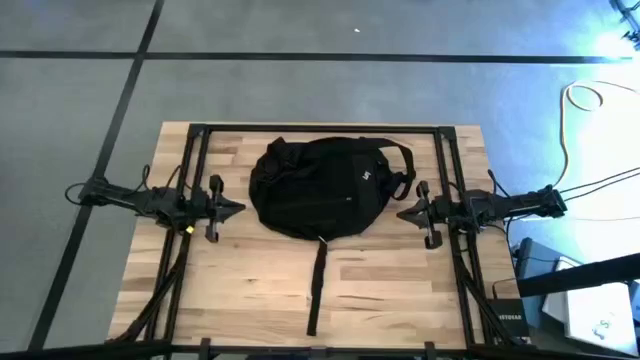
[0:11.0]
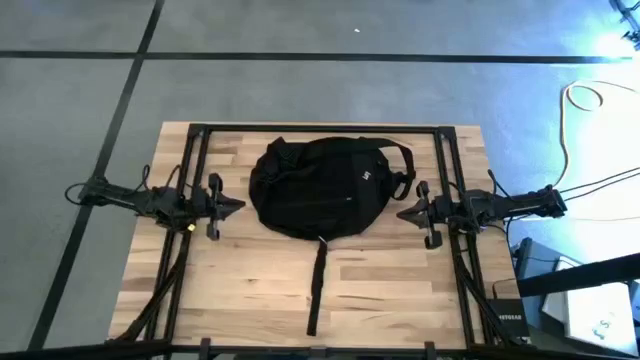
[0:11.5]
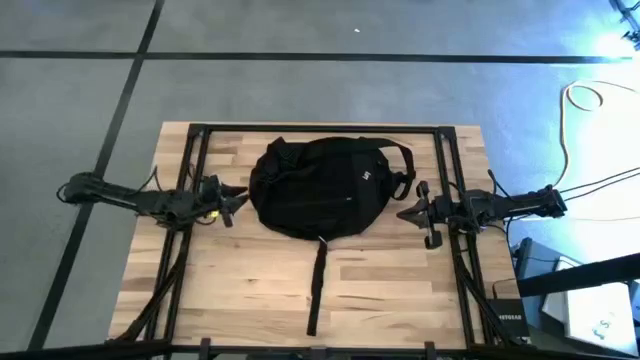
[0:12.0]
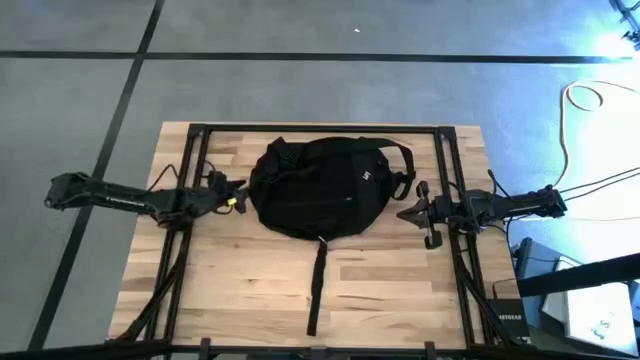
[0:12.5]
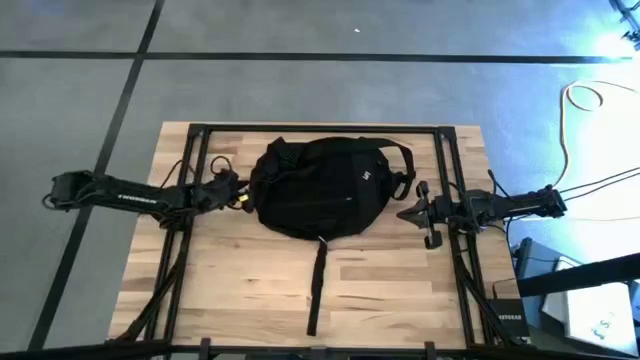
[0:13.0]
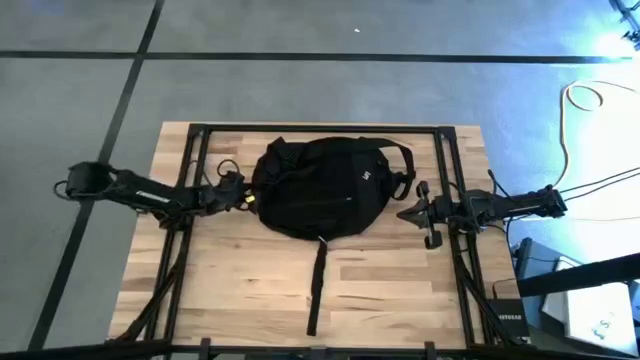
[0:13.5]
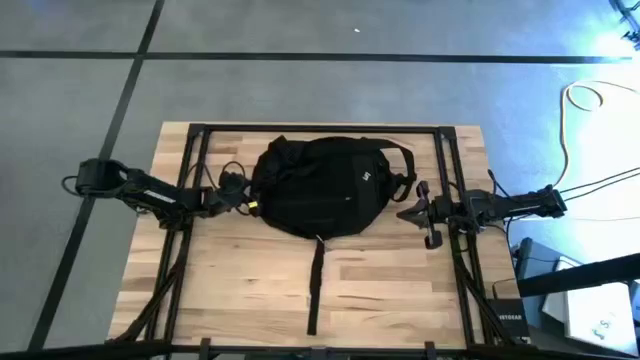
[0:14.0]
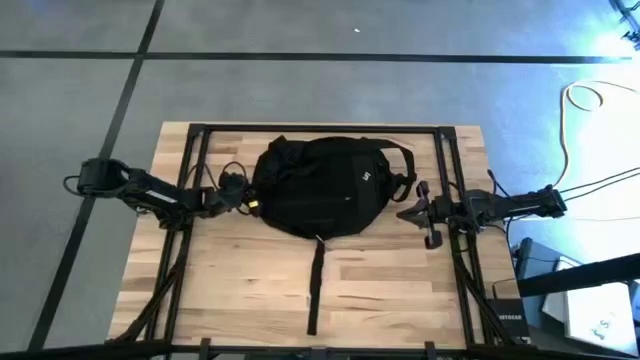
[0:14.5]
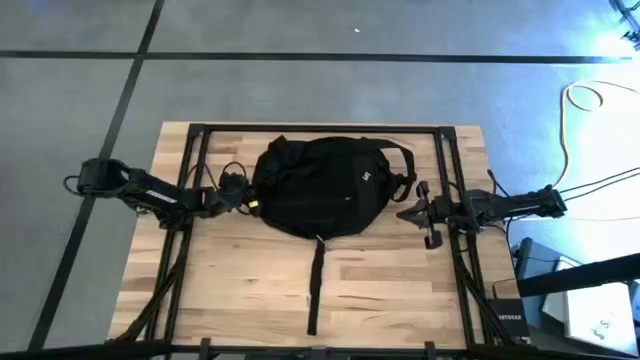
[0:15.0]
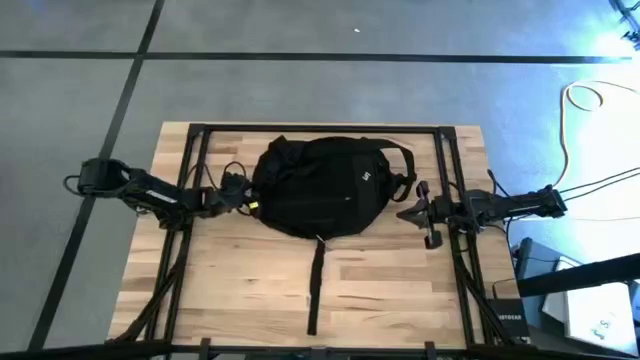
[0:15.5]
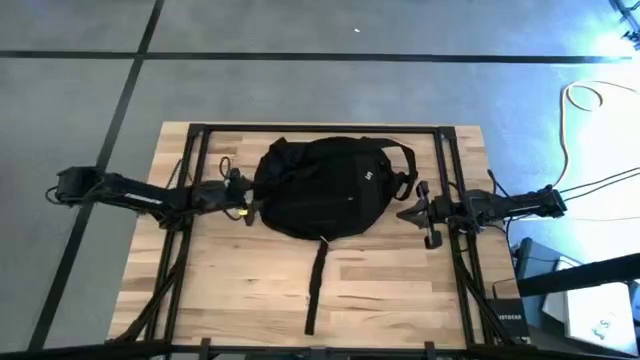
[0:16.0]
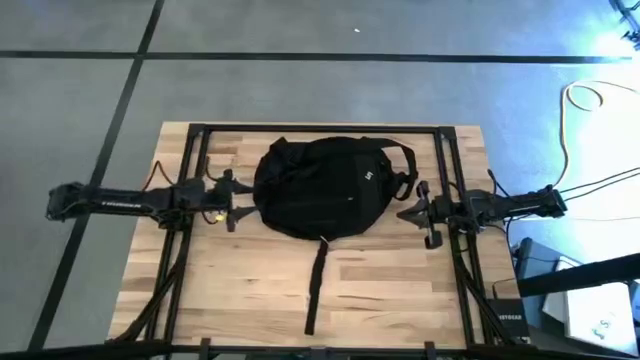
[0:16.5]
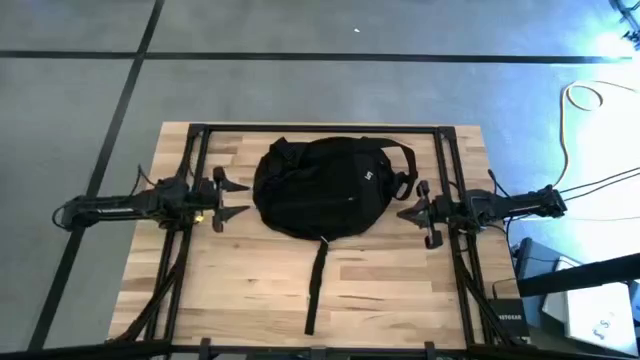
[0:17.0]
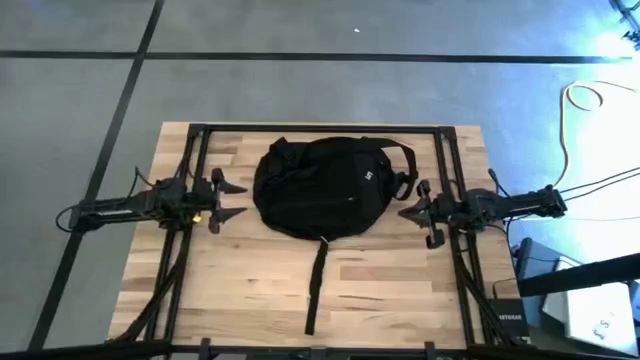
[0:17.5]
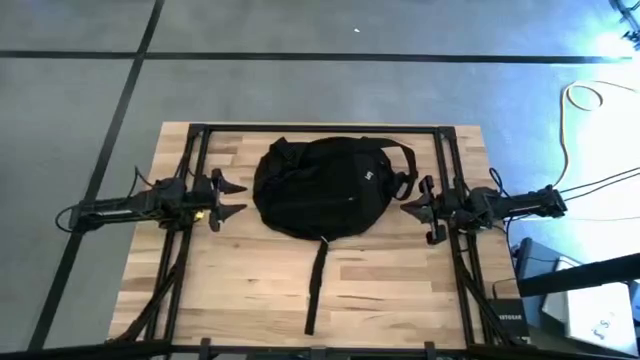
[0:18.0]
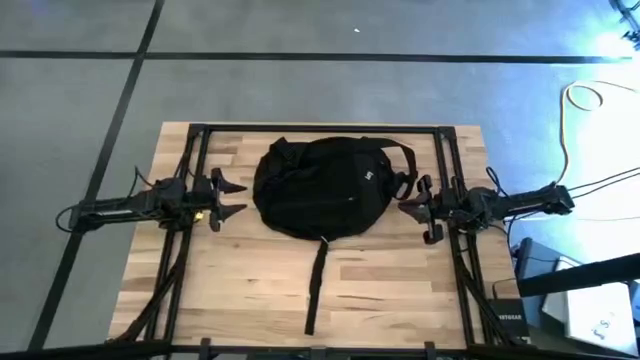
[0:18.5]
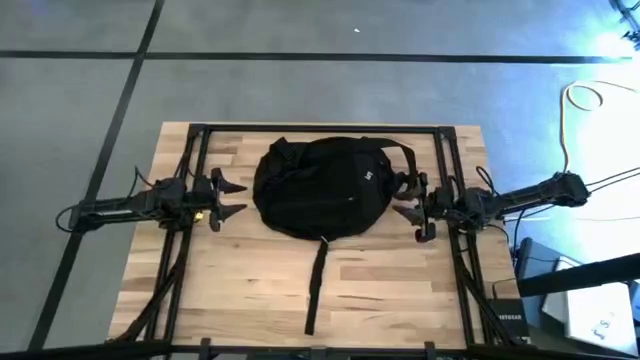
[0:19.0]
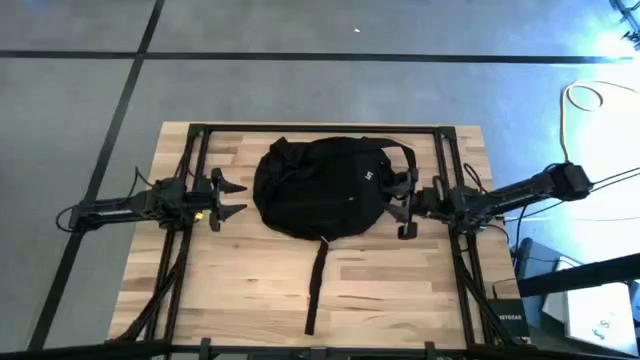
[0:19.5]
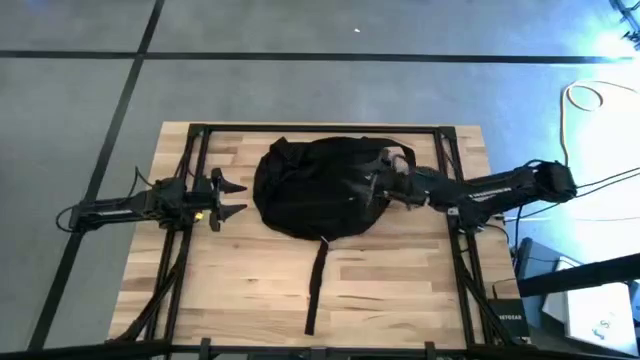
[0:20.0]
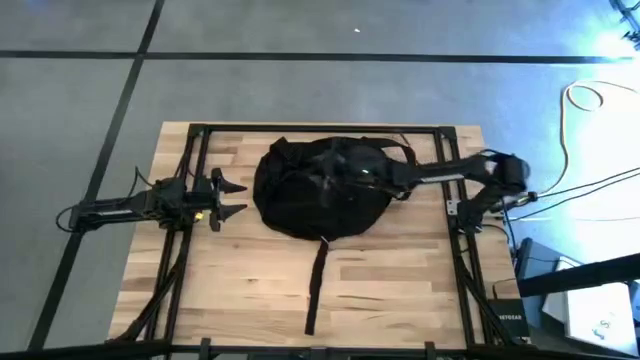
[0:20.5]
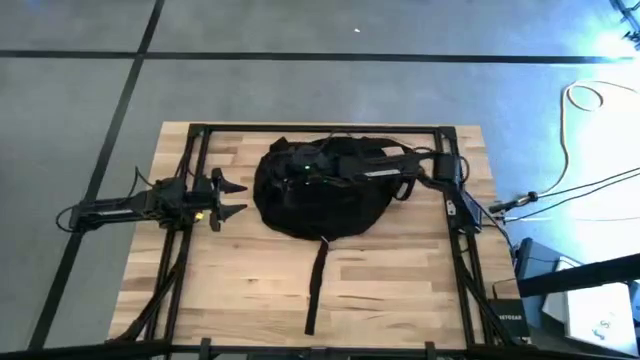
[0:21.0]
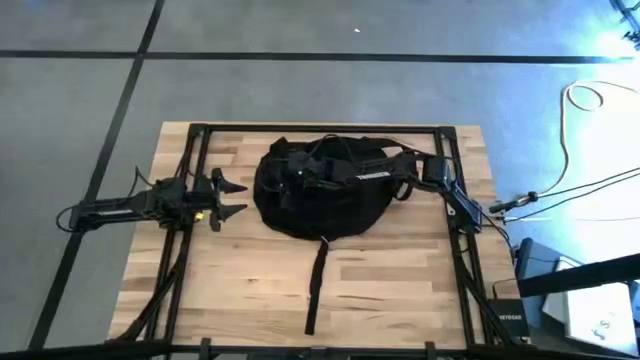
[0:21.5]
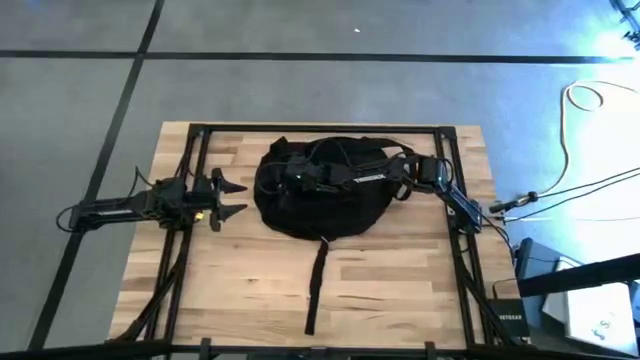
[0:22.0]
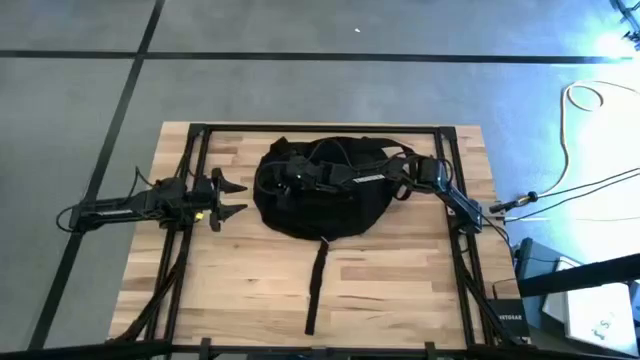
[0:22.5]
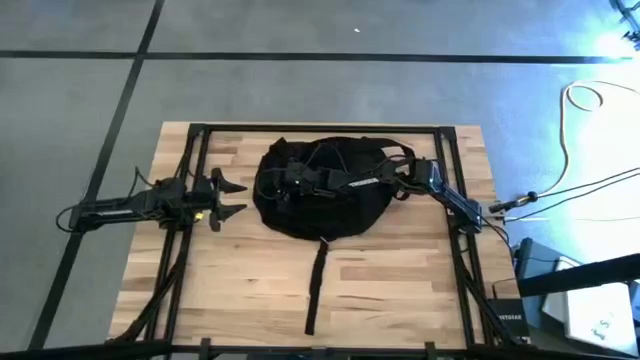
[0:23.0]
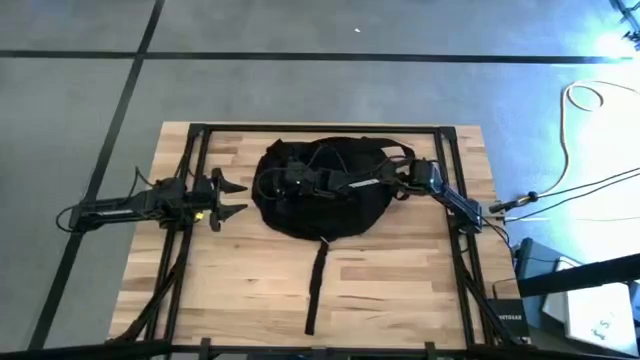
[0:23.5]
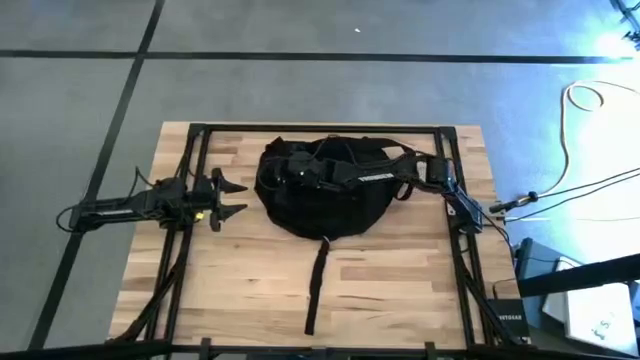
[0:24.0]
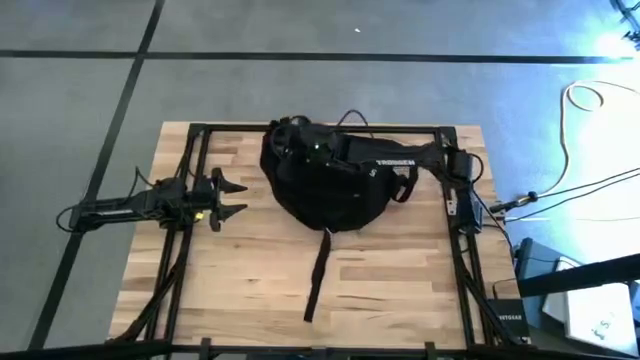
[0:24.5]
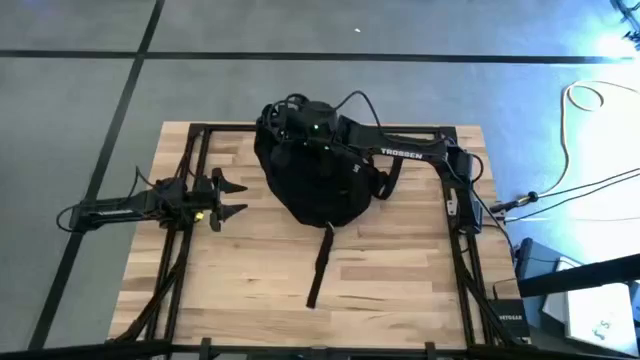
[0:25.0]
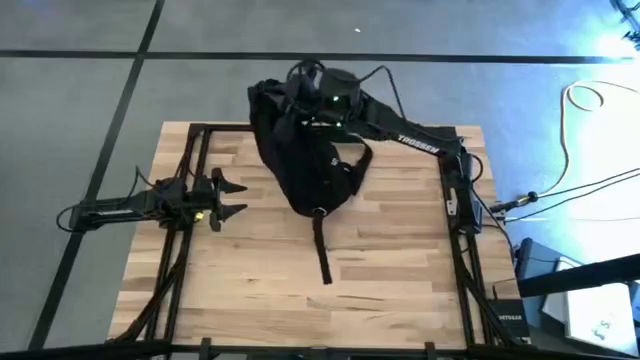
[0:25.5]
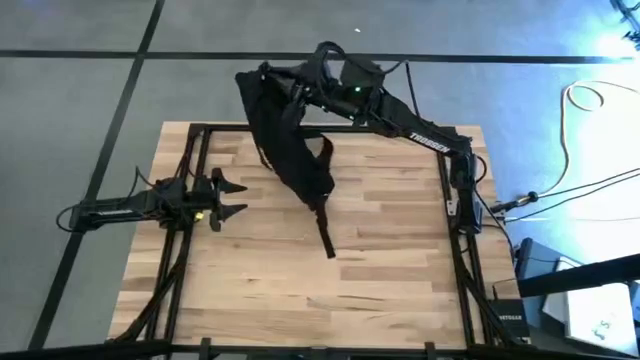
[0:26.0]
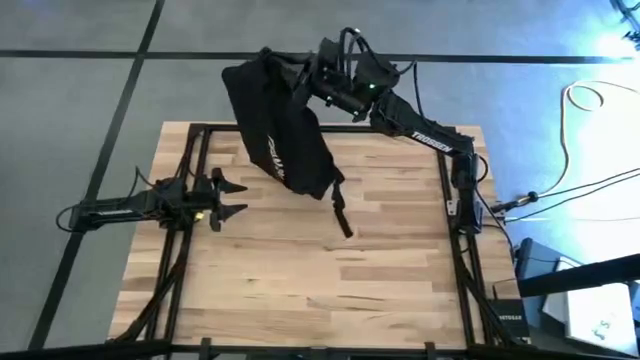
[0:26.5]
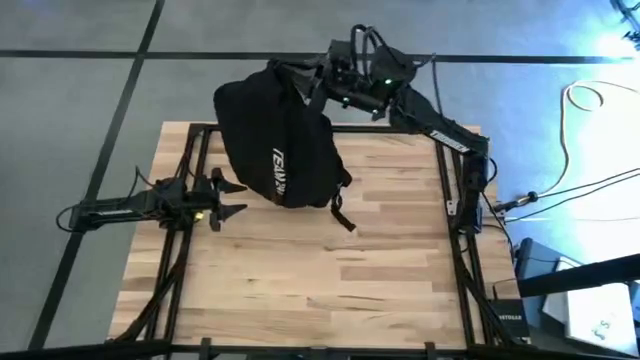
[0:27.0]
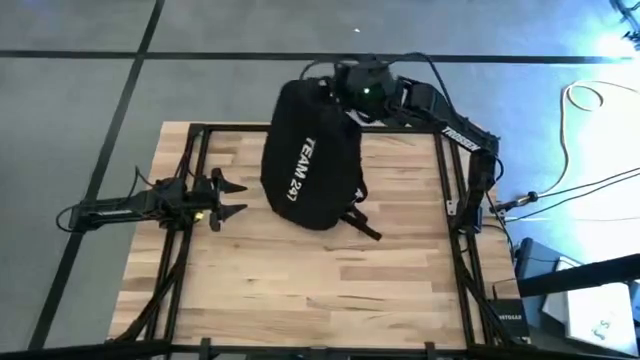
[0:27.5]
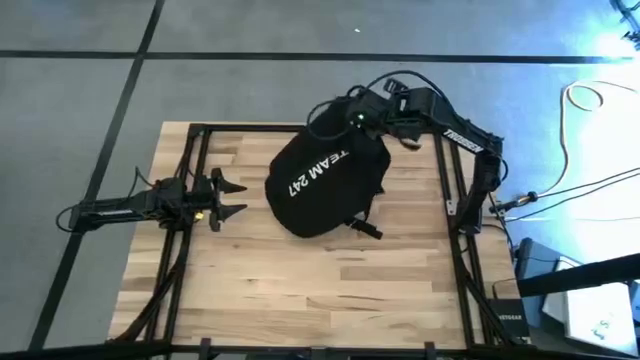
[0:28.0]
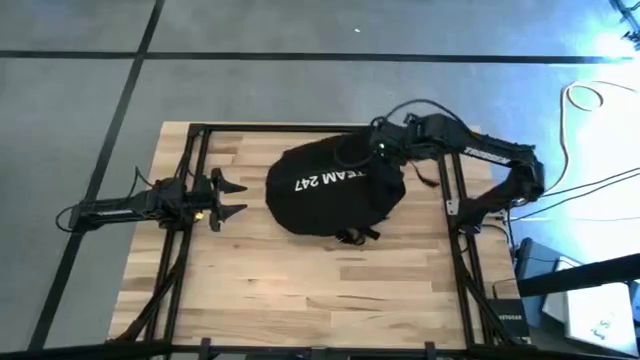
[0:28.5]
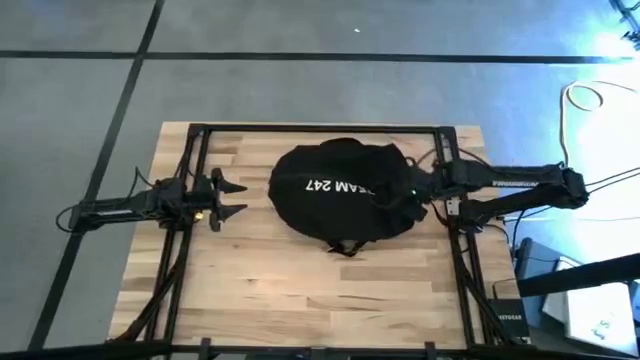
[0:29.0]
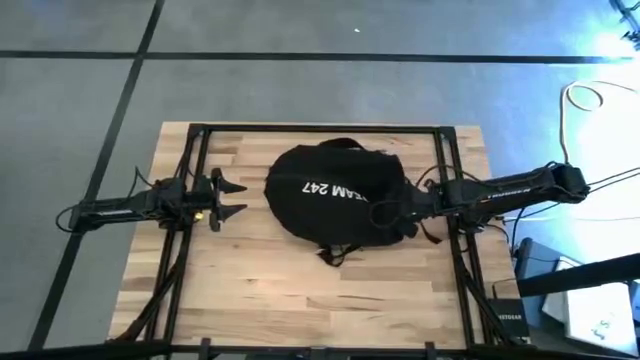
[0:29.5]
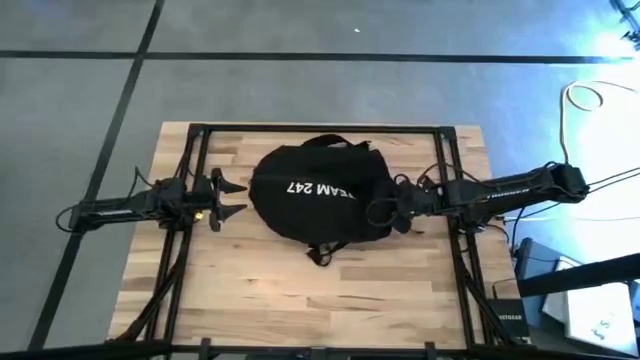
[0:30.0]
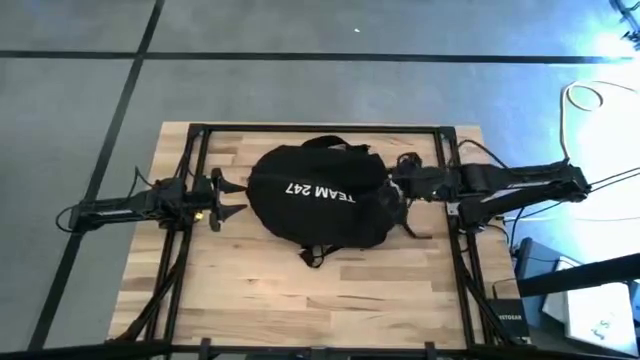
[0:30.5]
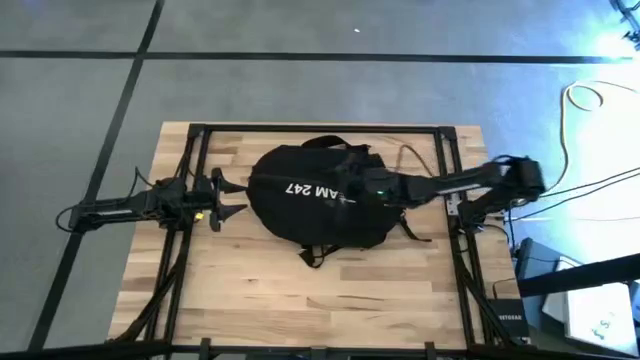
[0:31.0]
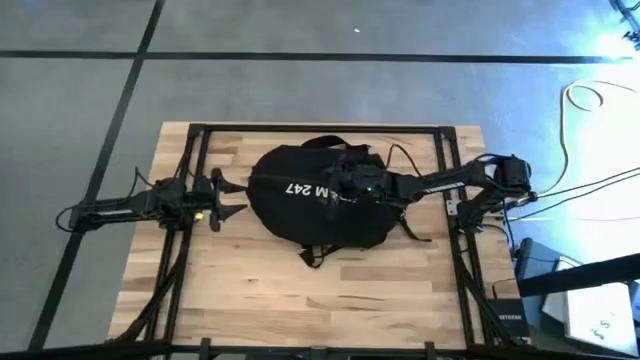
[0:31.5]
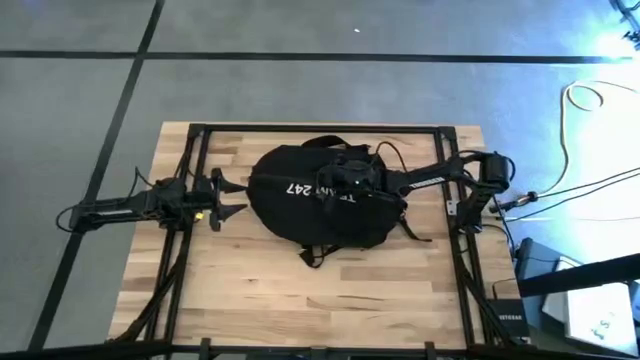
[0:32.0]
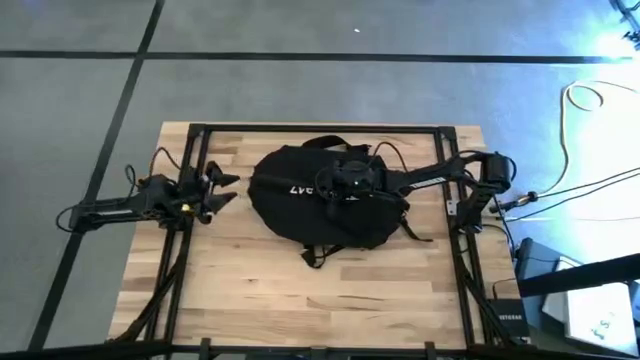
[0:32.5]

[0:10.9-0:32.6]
Task: Unpack backpack
Open the black backpack
